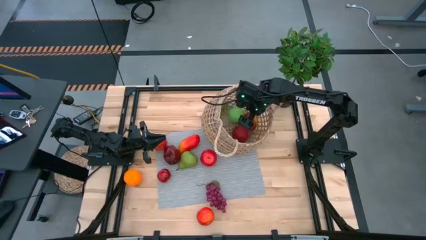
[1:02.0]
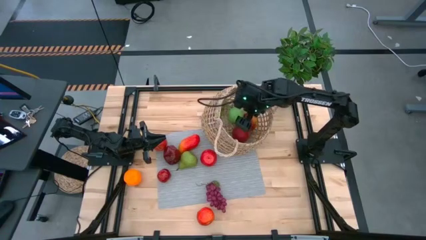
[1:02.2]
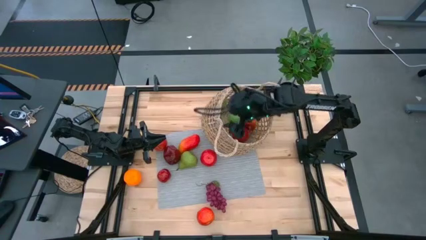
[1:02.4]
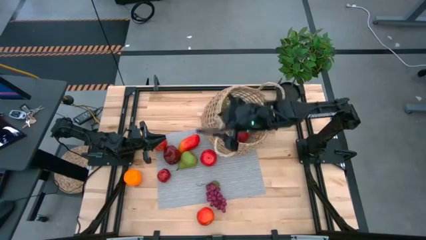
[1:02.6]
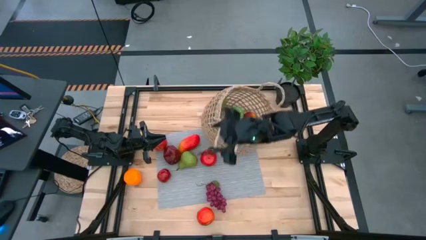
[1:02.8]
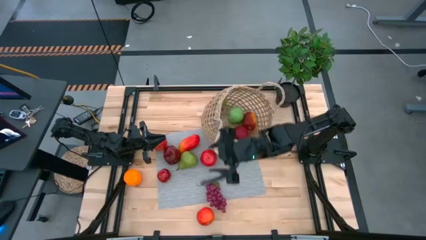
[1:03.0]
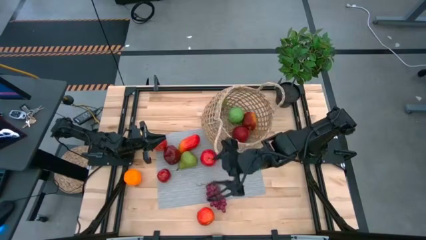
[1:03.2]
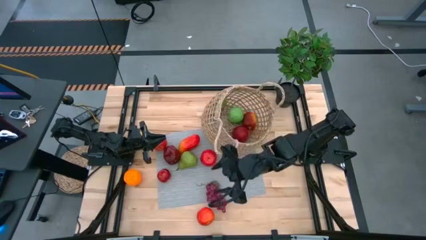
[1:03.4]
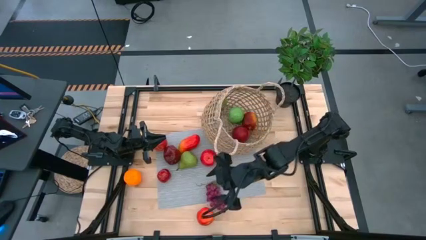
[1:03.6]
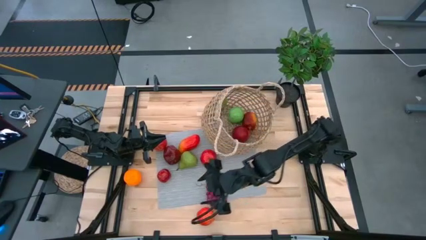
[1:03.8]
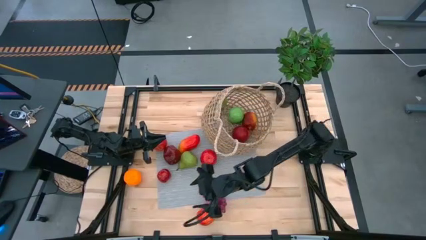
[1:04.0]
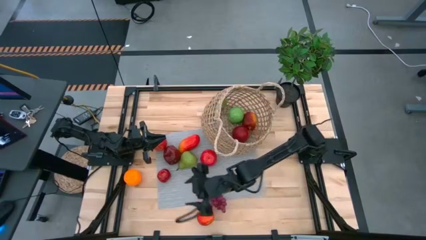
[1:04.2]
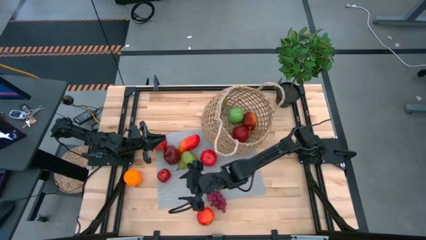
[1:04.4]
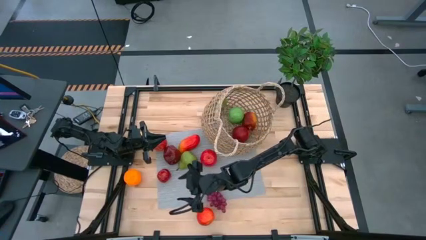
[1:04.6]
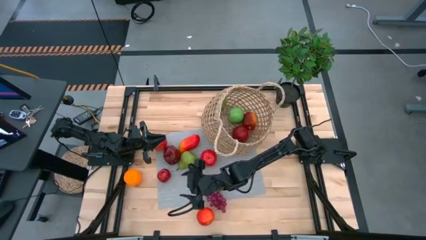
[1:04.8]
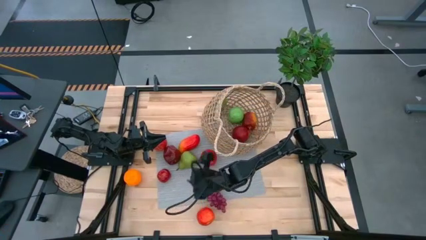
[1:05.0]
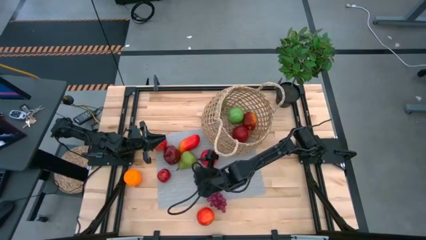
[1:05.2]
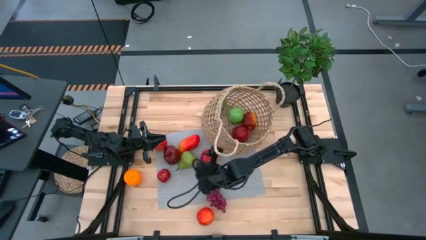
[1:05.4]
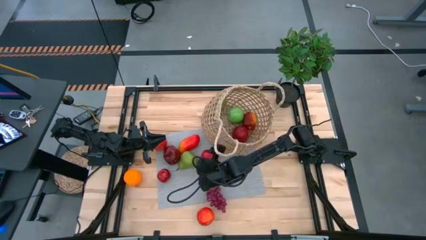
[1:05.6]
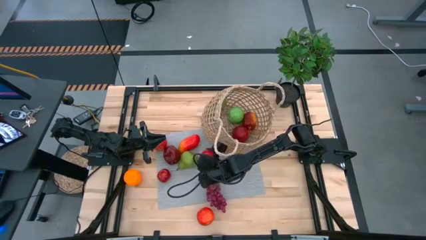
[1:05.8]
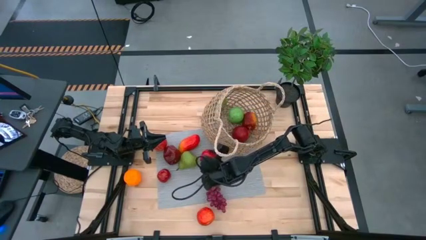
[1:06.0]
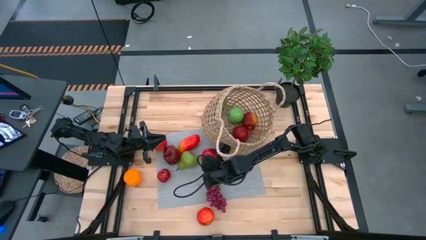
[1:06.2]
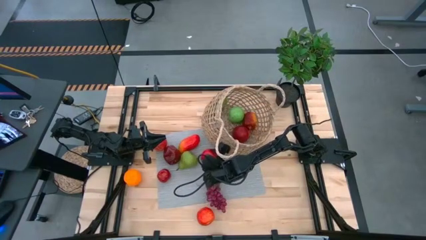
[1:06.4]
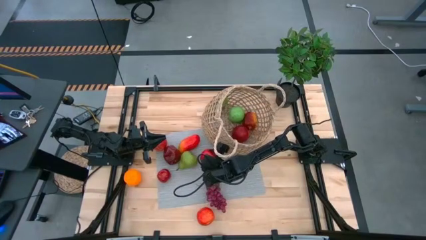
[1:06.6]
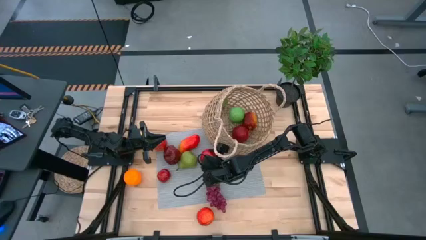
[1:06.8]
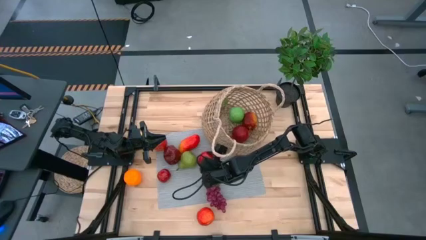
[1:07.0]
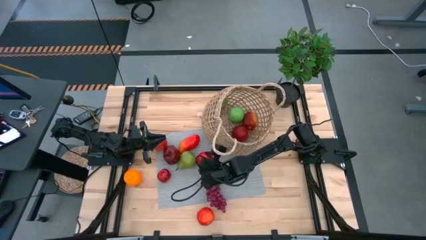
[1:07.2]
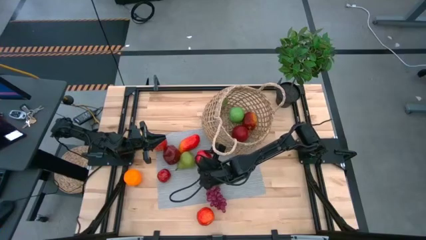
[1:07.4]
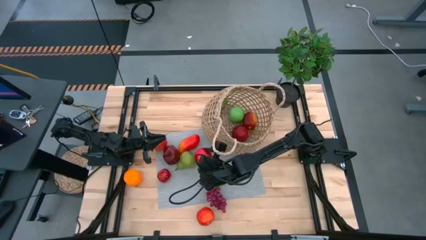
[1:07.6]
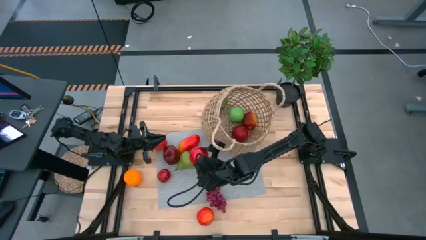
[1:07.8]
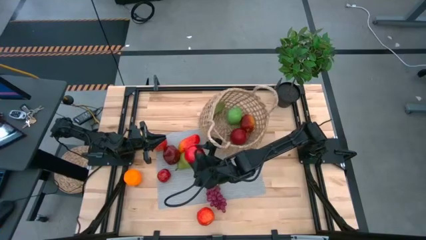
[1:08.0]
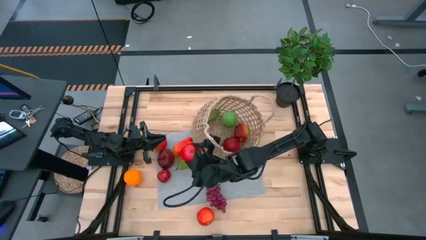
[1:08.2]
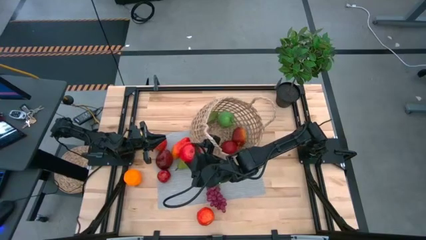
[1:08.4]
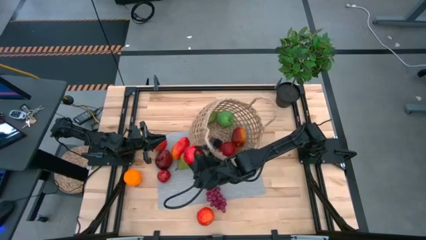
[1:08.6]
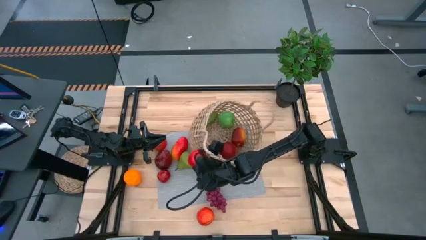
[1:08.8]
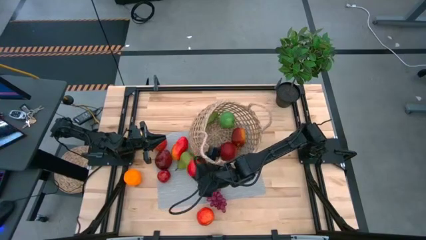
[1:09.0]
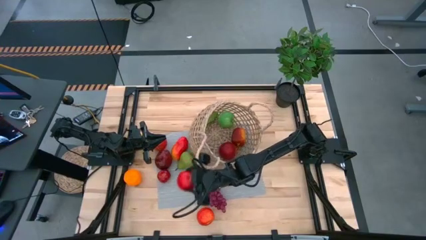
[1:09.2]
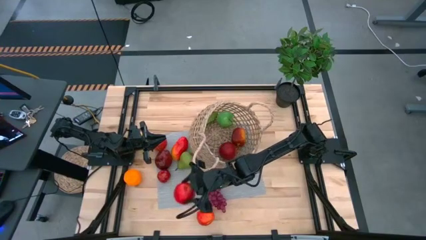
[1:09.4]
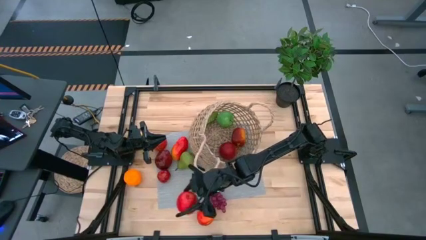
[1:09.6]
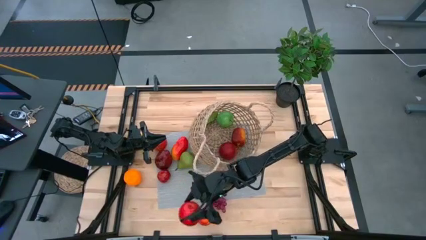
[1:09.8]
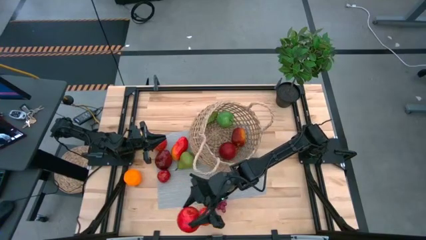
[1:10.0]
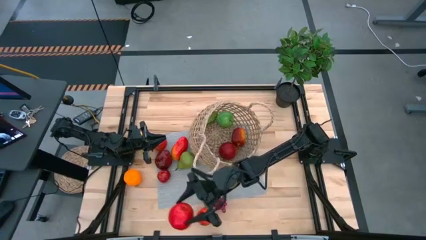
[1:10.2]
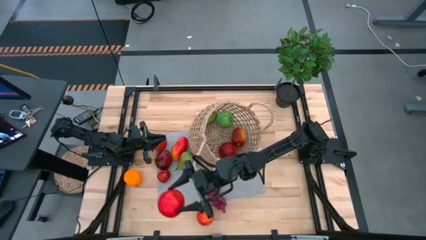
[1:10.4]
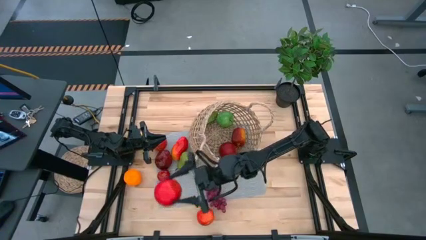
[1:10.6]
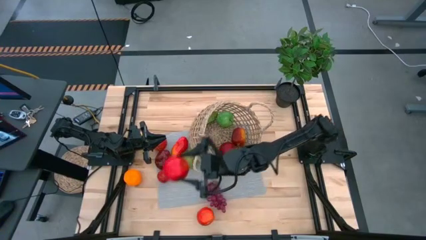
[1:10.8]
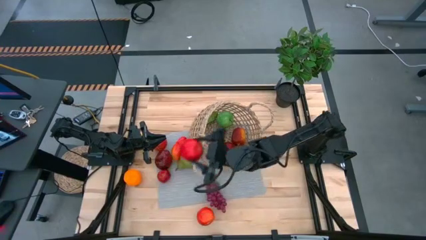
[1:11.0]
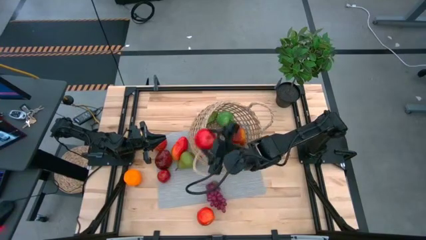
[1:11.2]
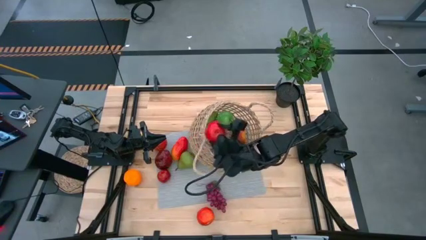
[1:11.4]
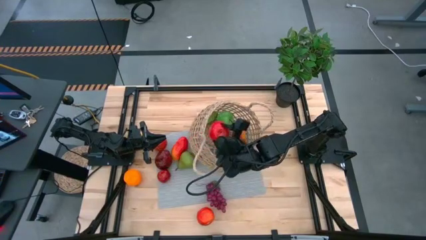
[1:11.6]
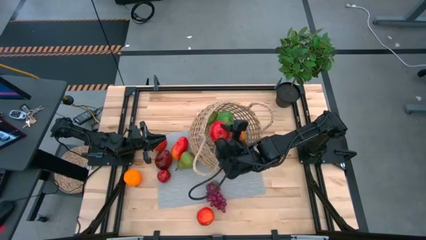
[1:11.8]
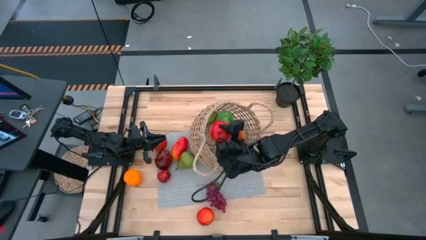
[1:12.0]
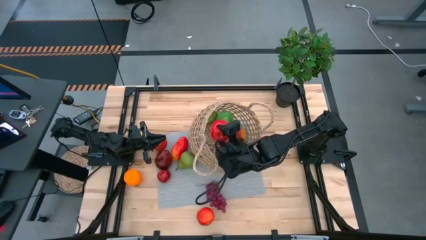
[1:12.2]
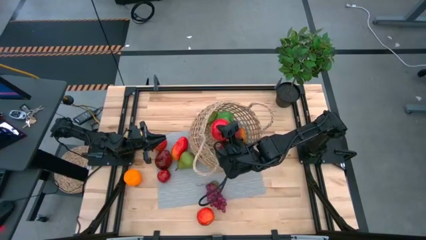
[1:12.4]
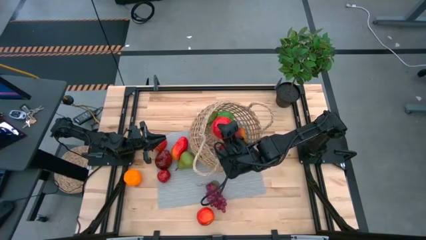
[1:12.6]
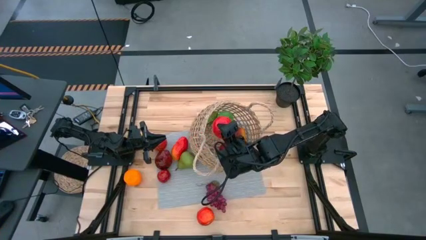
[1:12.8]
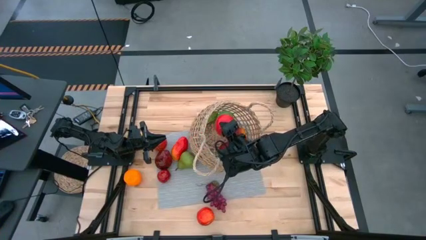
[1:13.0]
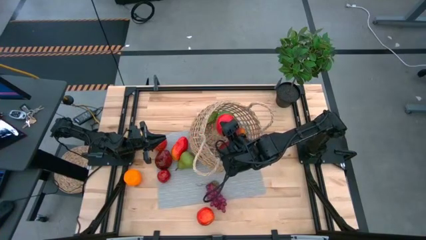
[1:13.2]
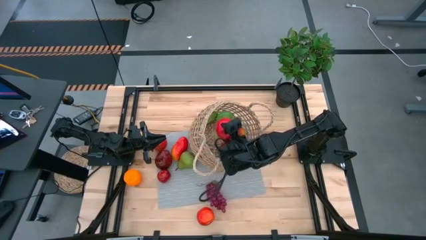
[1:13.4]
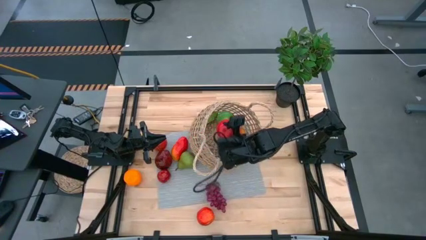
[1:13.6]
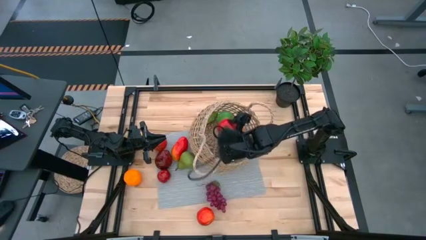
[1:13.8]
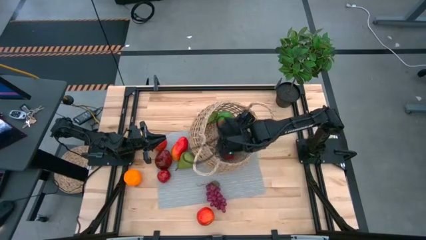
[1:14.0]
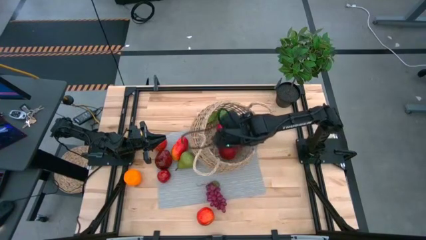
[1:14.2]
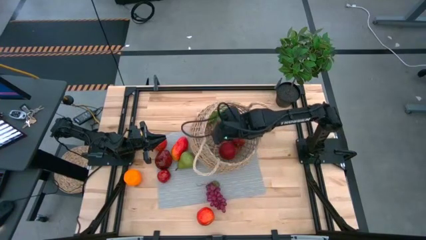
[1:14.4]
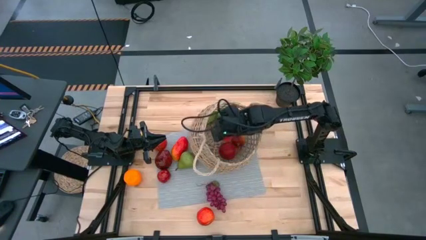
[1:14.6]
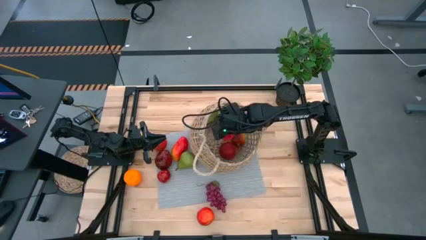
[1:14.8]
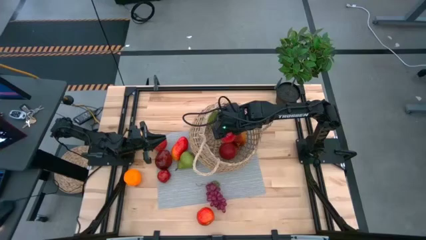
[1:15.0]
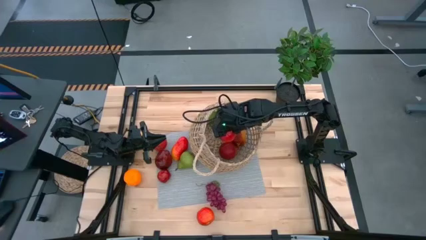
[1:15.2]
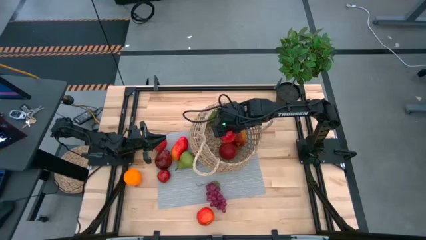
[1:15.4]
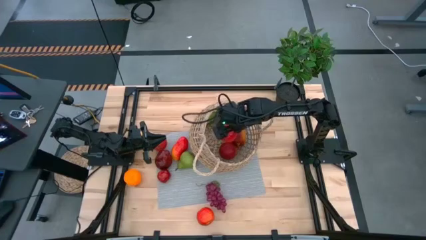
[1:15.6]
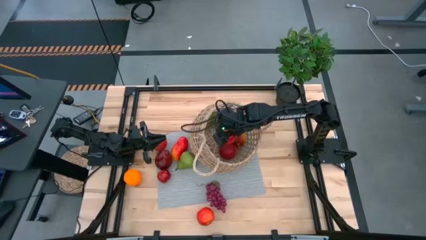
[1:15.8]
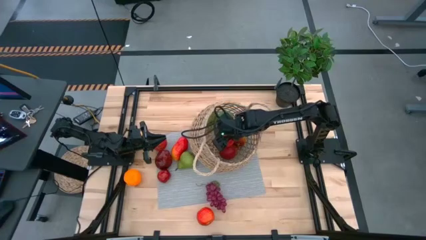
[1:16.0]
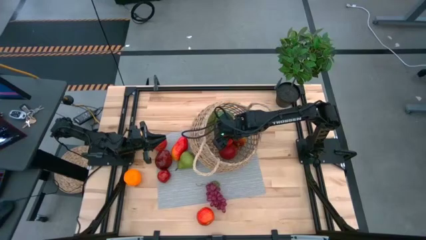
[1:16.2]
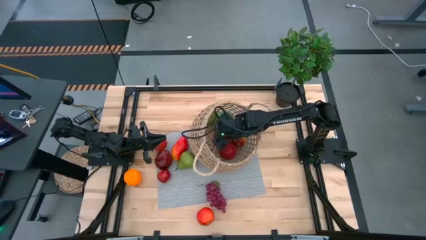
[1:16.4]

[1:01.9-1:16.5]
Task: Build produce basket
Put the red apple into the brown basket

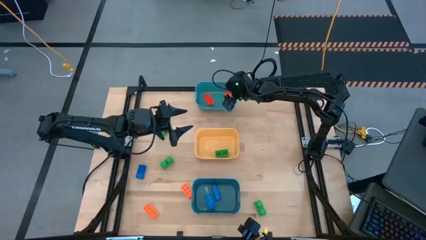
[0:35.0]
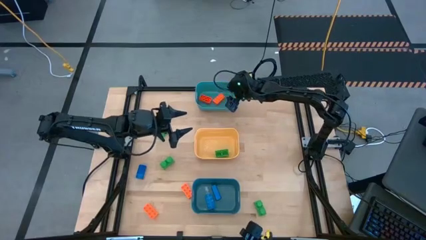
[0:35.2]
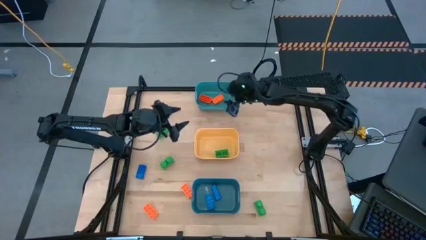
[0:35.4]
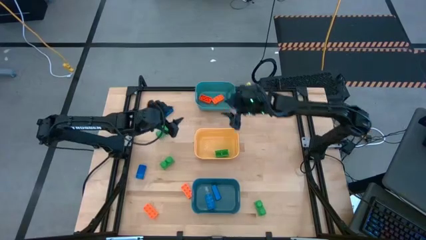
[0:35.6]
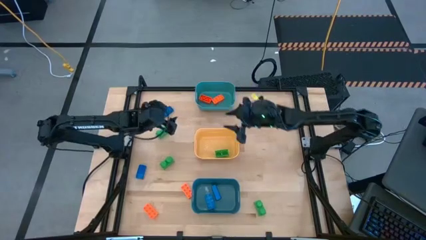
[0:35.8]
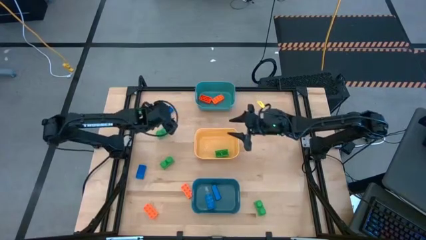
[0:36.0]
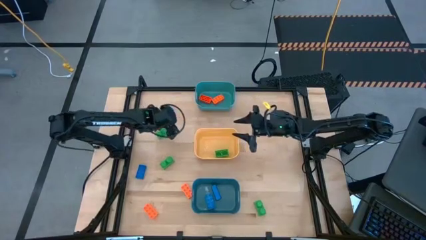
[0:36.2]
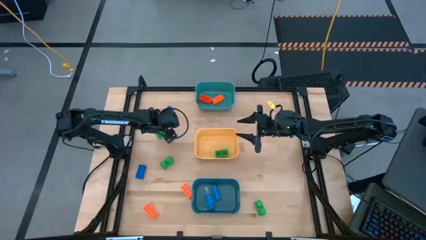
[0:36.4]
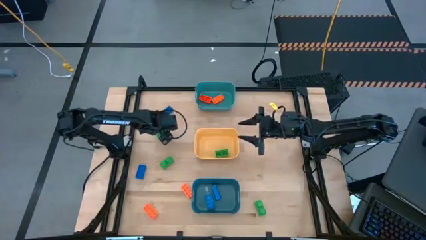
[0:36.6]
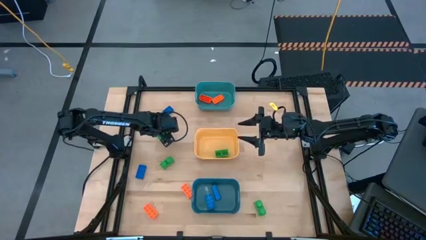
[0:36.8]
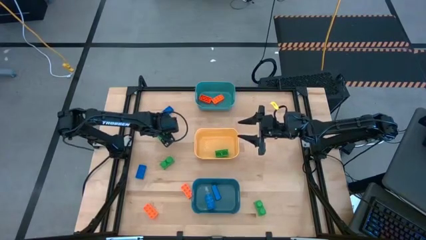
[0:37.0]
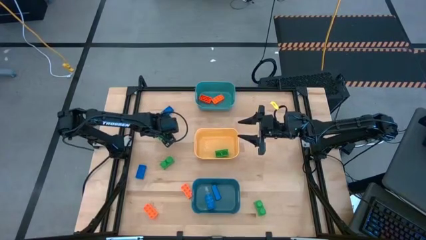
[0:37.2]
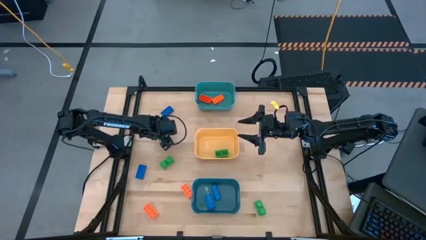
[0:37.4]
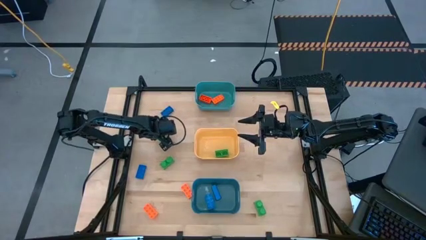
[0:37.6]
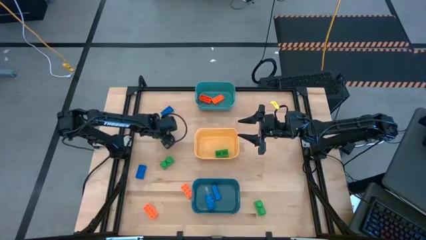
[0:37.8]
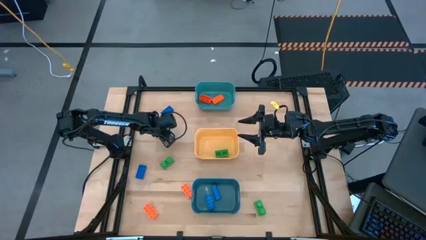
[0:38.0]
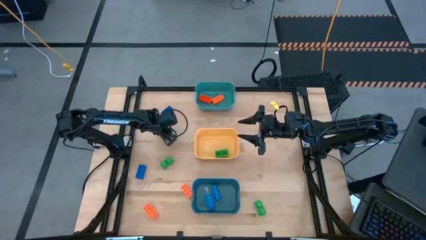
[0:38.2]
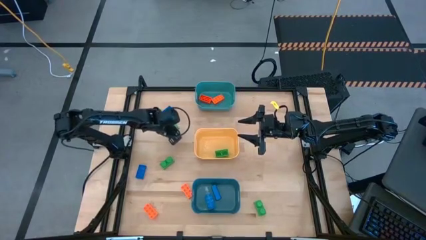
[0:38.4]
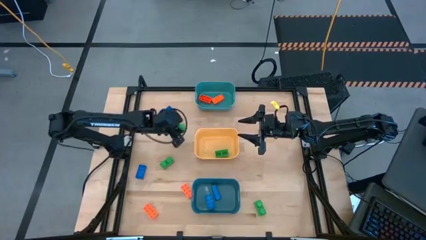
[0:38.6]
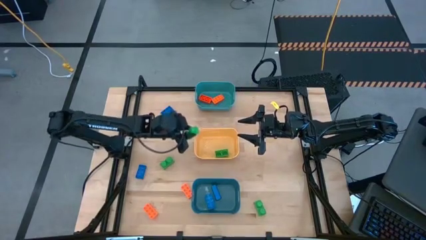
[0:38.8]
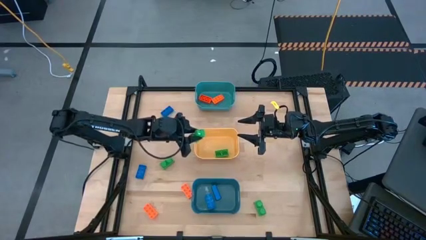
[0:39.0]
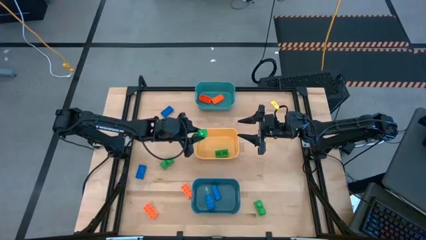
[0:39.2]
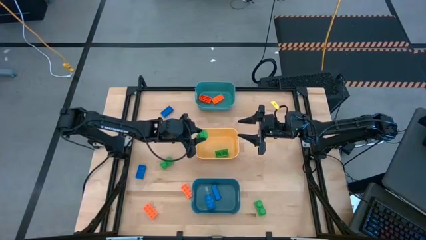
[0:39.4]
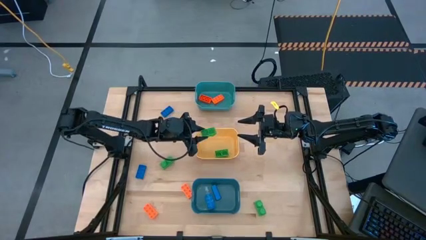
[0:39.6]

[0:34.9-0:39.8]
Task: Sort & place blocks by color
Put the green game piece into the yellow bin
